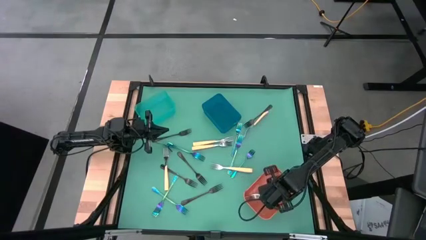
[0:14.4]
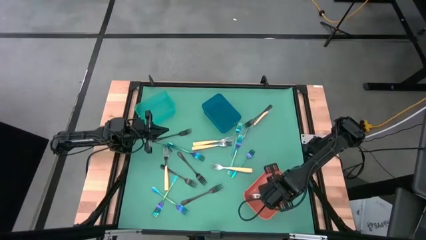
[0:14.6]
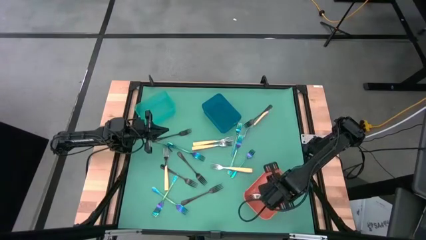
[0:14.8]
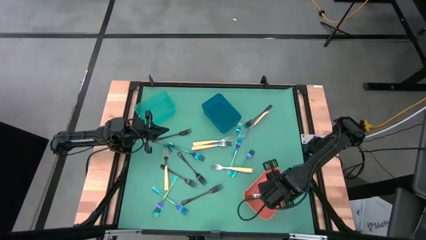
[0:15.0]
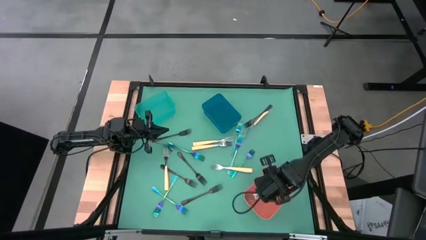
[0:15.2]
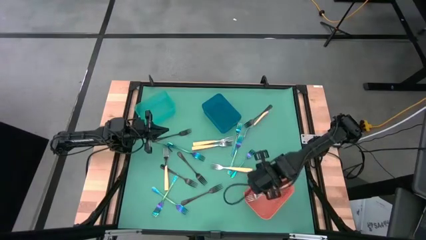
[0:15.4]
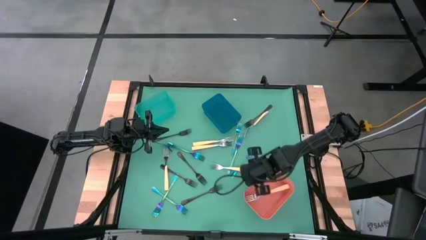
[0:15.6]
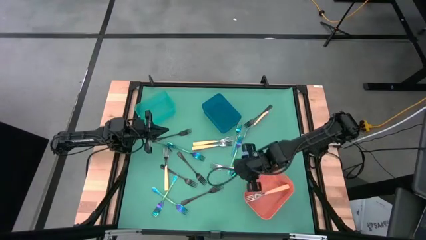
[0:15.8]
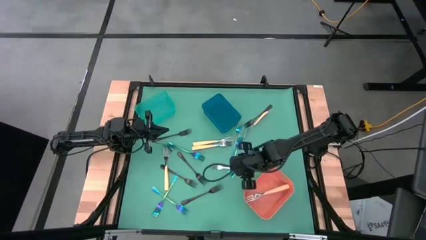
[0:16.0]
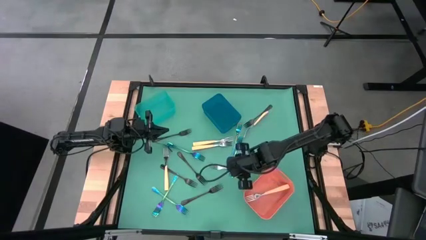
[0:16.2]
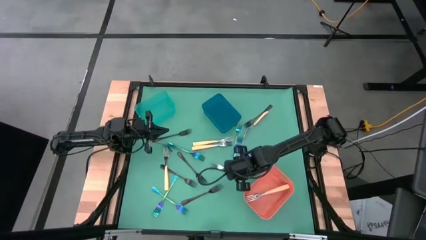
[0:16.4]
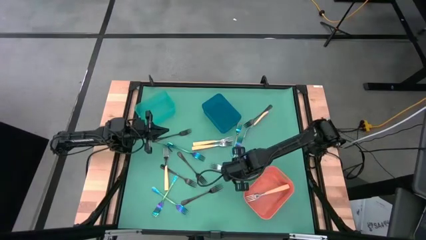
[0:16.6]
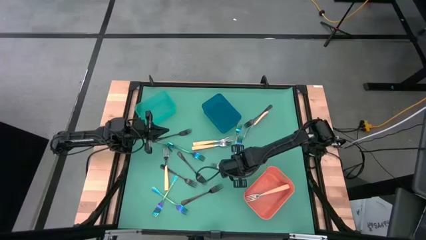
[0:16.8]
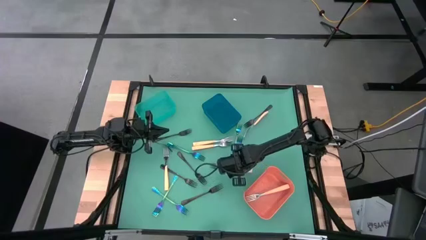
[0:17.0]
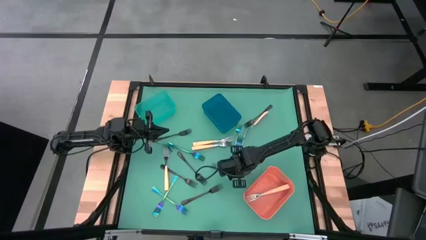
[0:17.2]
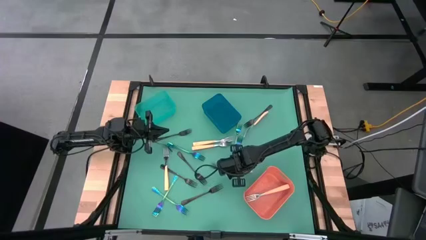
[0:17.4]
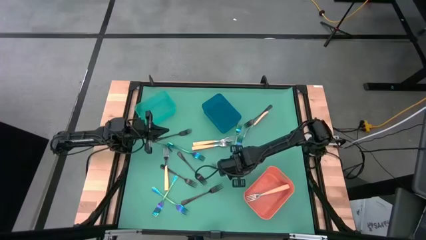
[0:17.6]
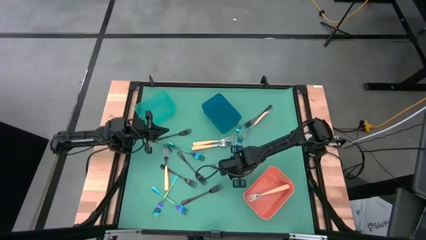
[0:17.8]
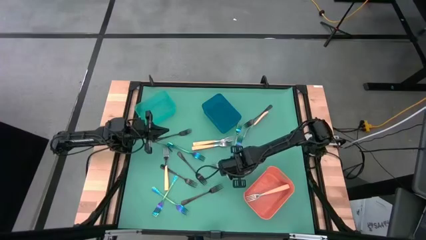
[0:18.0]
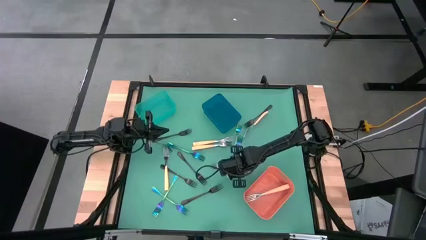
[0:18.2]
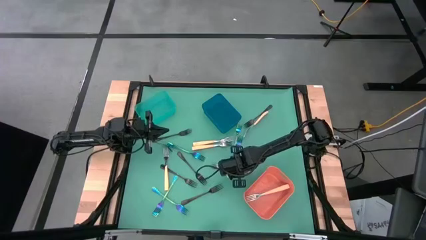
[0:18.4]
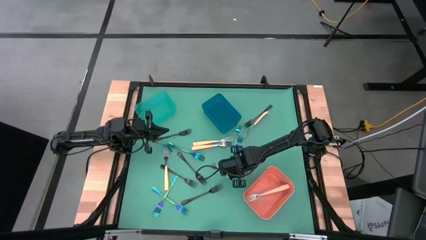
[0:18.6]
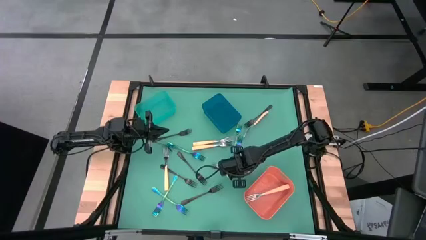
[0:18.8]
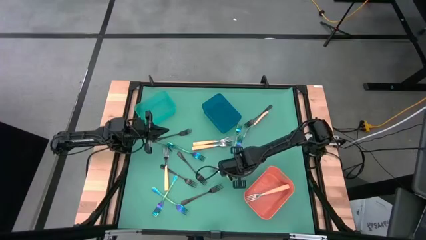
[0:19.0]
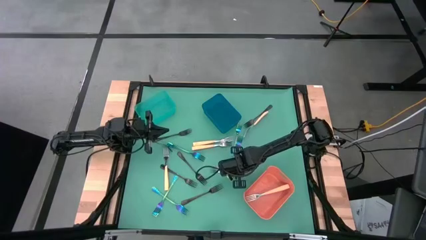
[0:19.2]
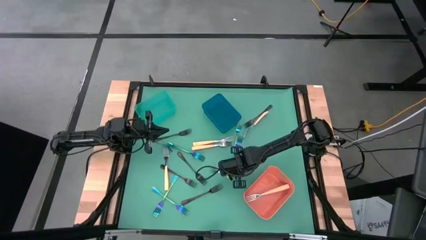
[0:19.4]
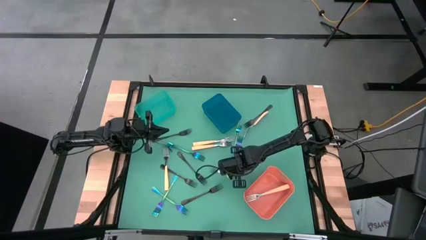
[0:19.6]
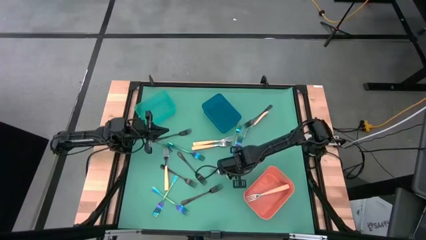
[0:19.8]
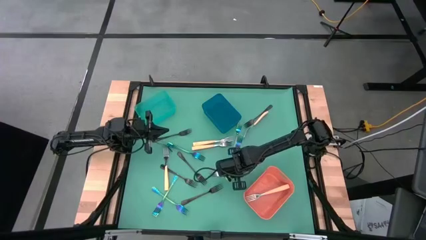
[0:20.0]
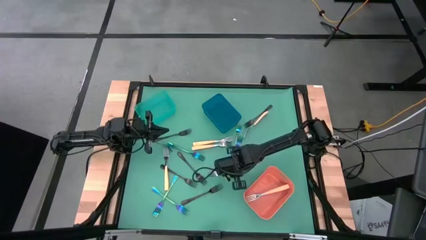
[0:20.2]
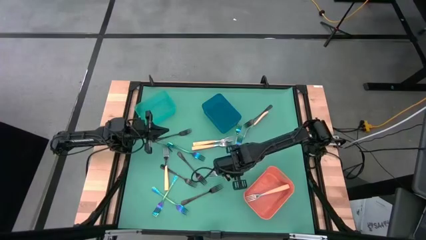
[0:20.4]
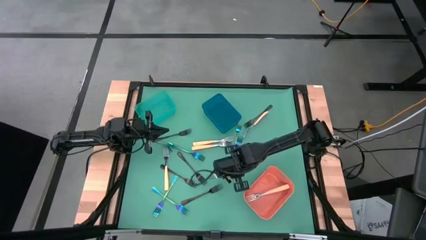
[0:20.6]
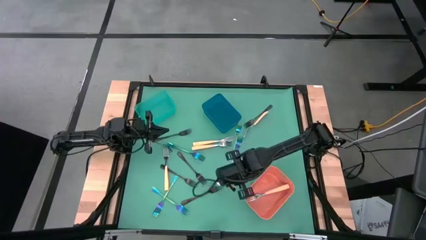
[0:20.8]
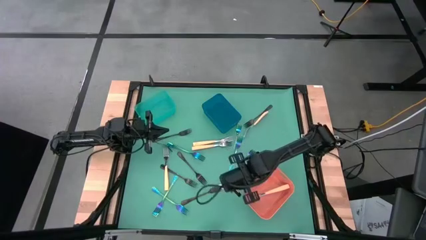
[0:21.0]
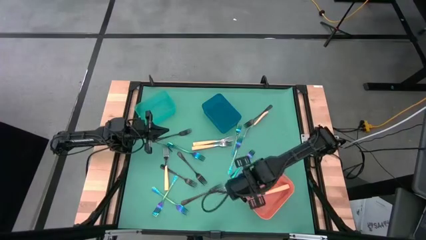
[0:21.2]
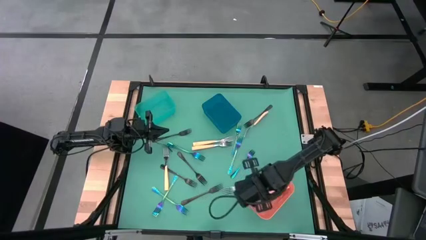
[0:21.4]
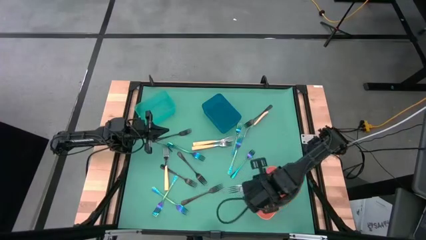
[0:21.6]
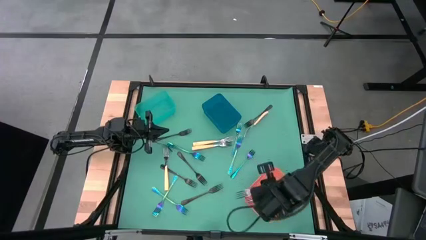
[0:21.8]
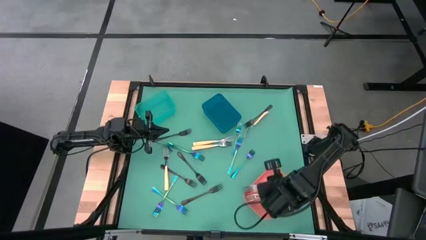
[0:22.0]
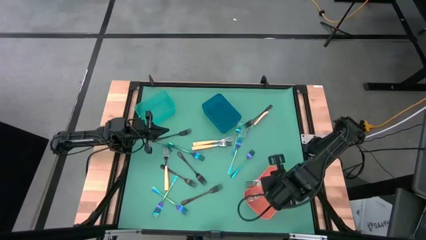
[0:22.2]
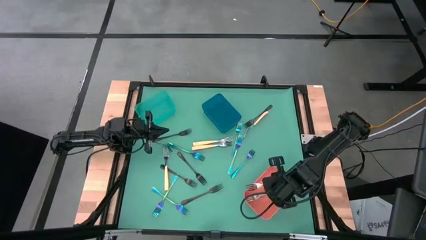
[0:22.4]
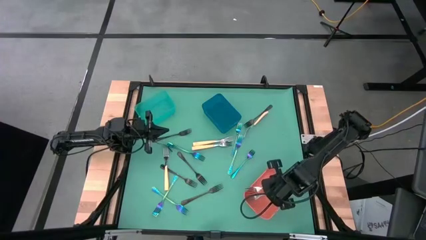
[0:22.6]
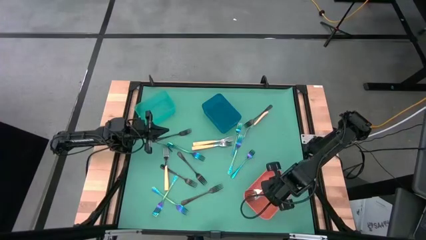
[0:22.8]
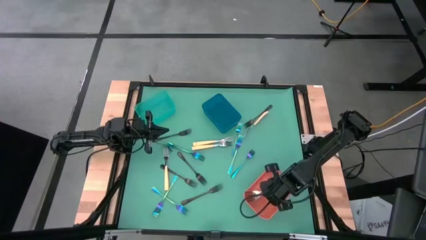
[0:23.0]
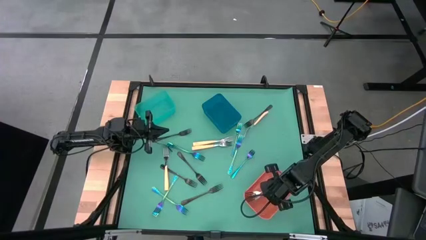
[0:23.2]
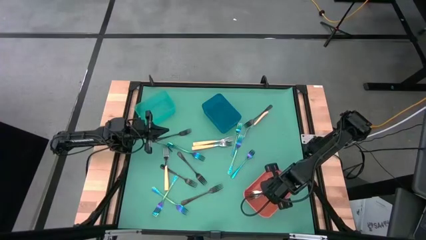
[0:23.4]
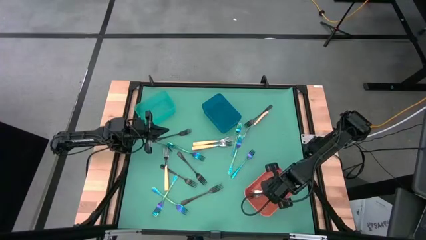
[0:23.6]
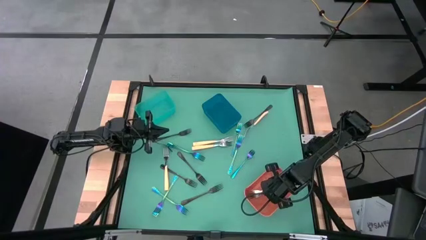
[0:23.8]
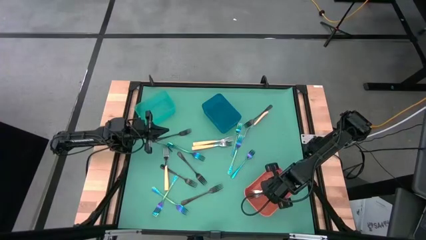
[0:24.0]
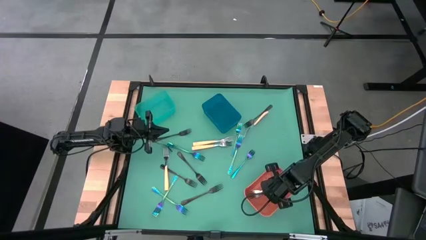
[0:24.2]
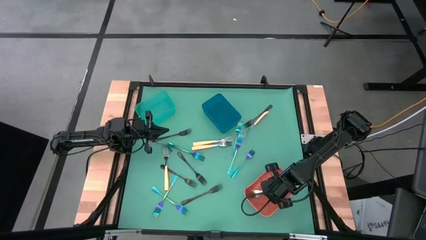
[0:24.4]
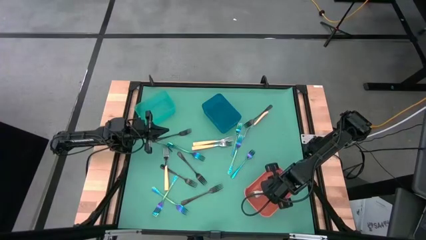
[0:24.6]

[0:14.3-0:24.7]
Task: Sort silverware by color (type)
Put the orange fork into the orange bin
